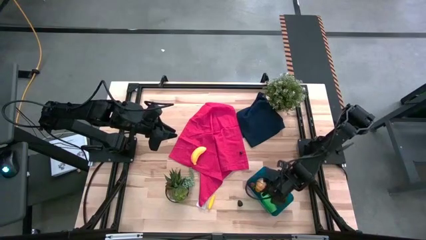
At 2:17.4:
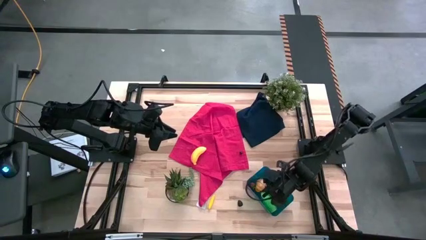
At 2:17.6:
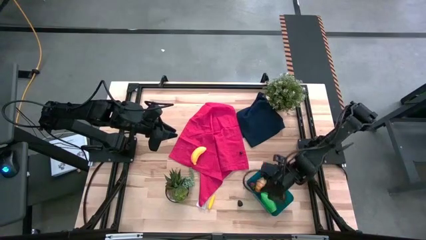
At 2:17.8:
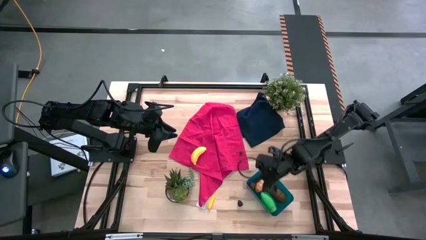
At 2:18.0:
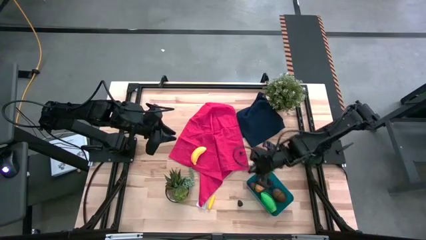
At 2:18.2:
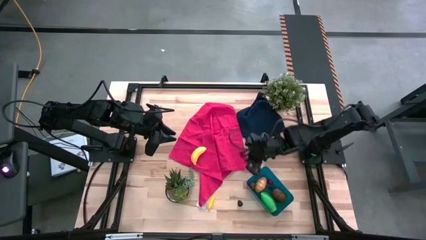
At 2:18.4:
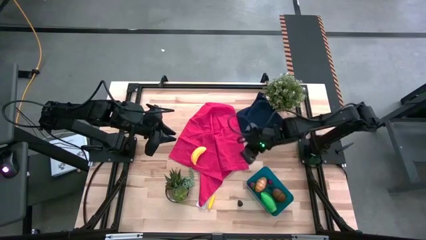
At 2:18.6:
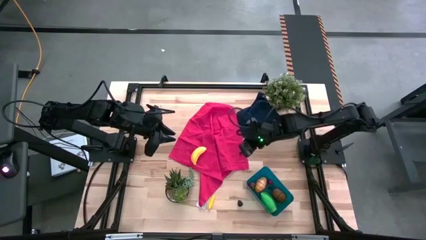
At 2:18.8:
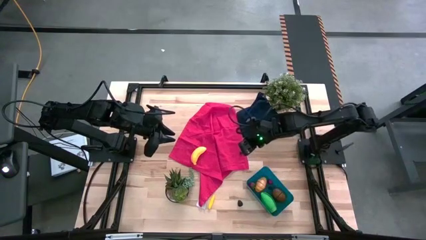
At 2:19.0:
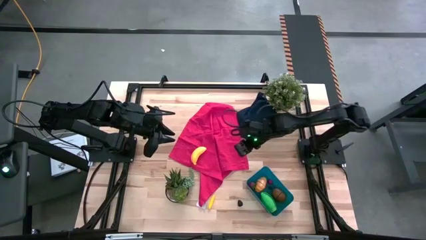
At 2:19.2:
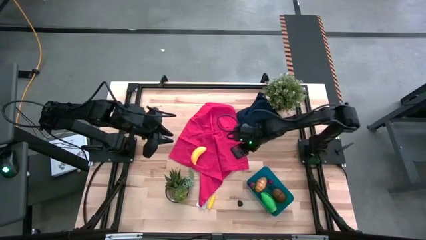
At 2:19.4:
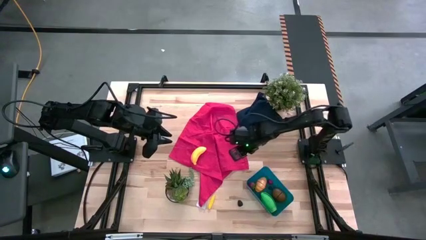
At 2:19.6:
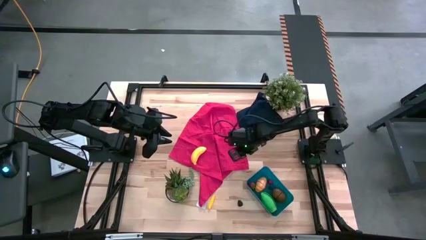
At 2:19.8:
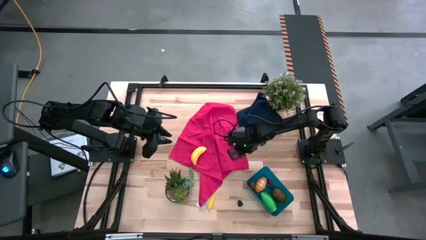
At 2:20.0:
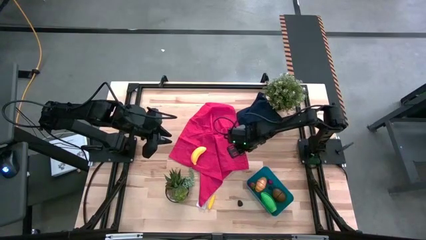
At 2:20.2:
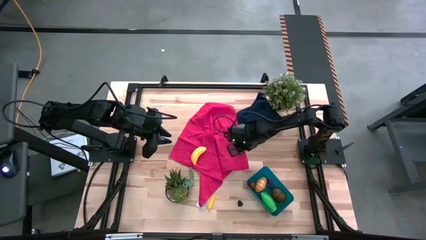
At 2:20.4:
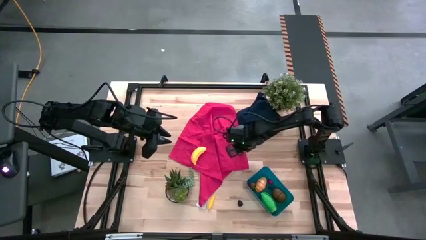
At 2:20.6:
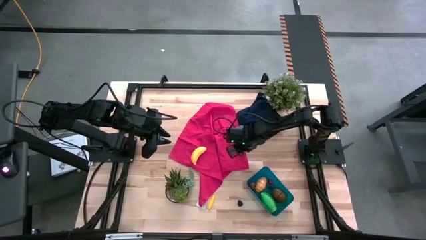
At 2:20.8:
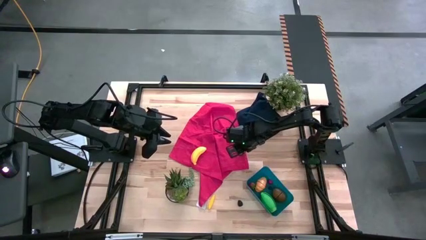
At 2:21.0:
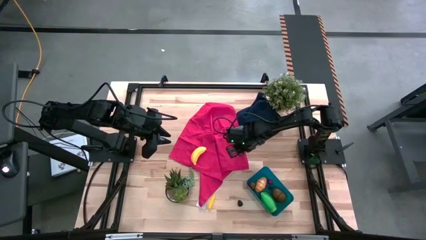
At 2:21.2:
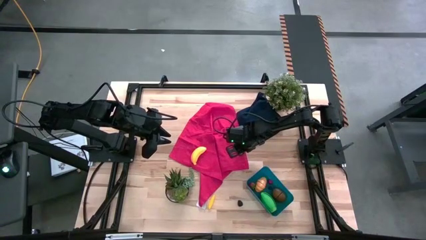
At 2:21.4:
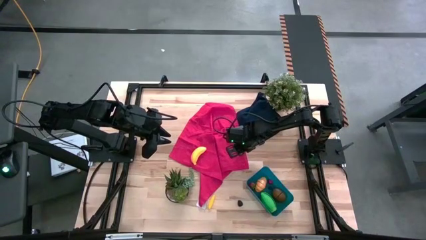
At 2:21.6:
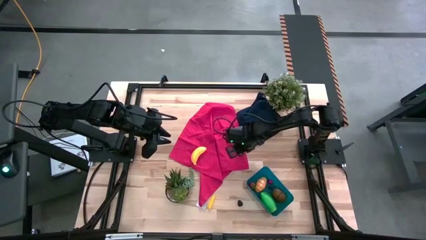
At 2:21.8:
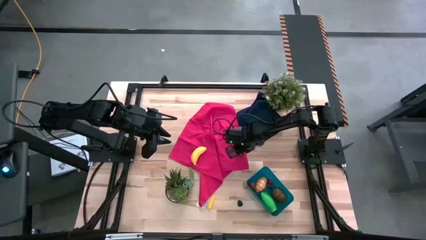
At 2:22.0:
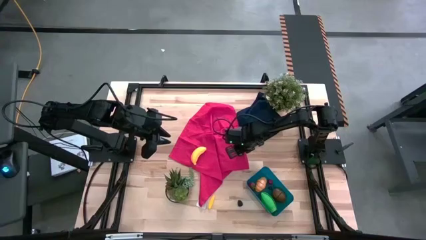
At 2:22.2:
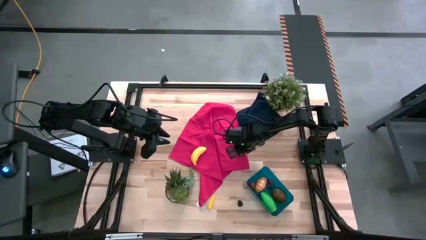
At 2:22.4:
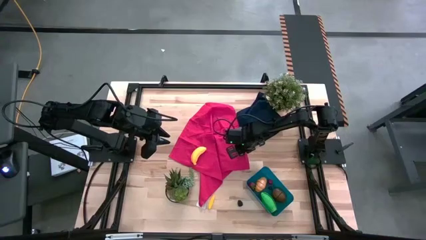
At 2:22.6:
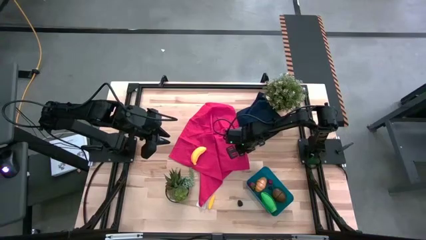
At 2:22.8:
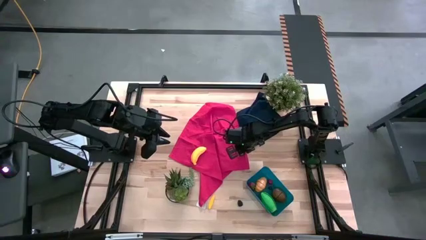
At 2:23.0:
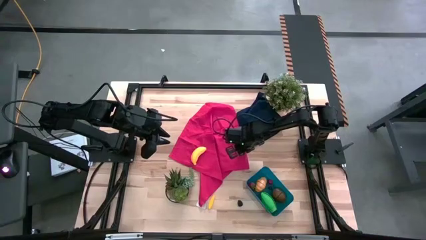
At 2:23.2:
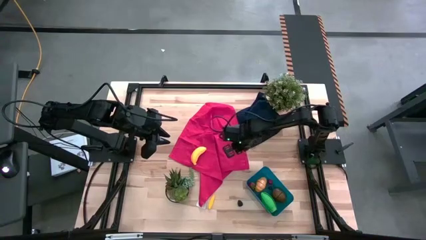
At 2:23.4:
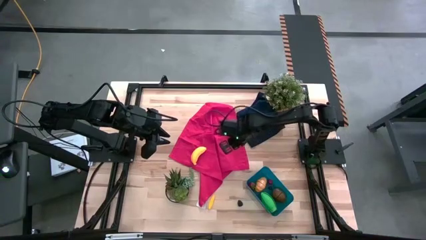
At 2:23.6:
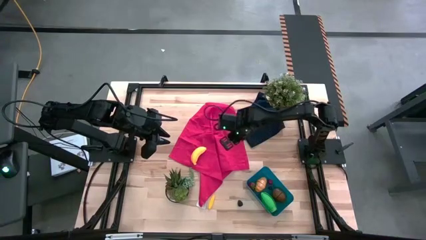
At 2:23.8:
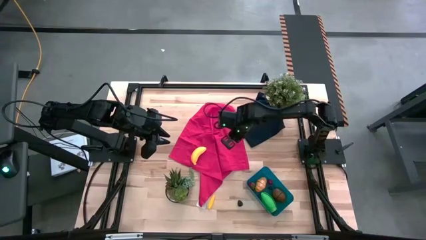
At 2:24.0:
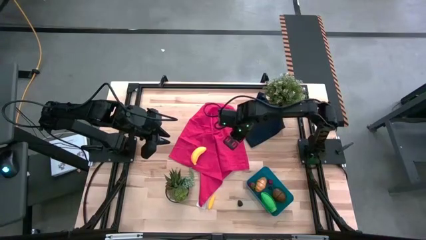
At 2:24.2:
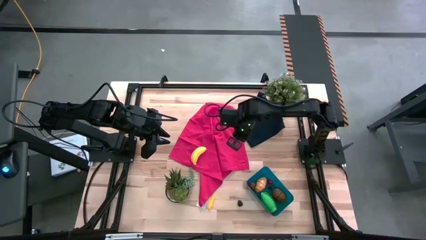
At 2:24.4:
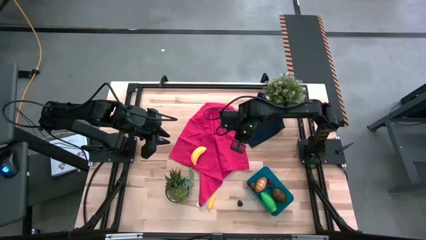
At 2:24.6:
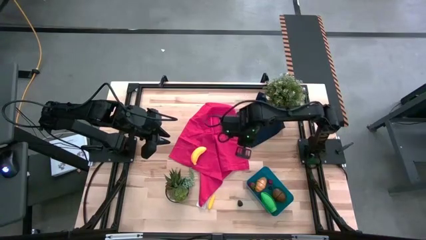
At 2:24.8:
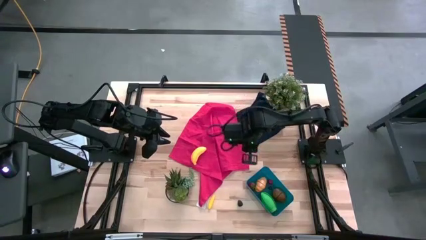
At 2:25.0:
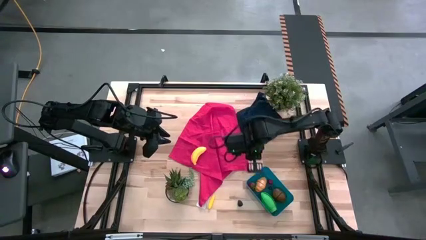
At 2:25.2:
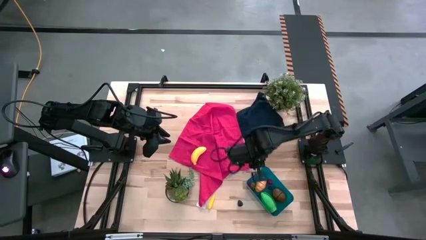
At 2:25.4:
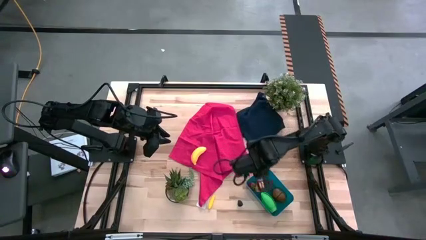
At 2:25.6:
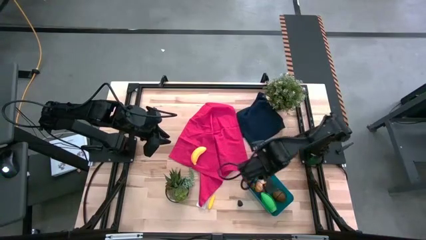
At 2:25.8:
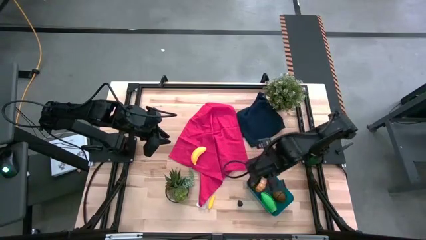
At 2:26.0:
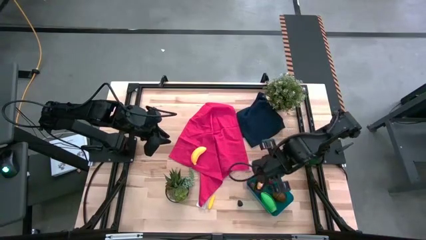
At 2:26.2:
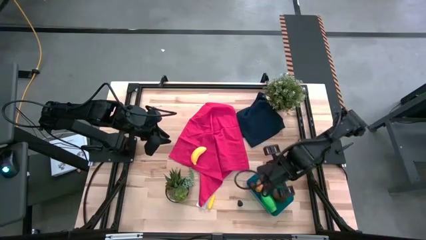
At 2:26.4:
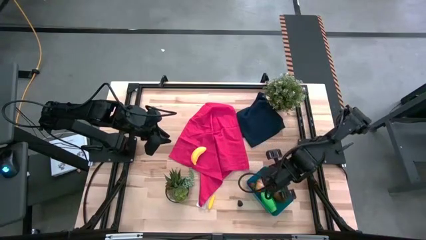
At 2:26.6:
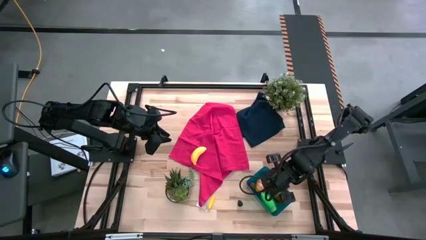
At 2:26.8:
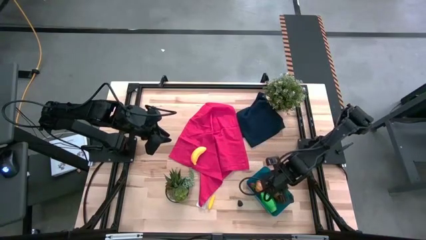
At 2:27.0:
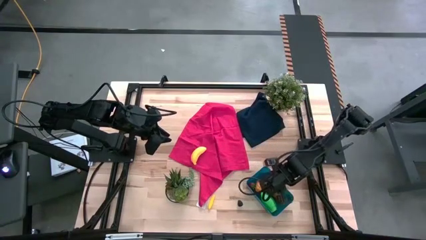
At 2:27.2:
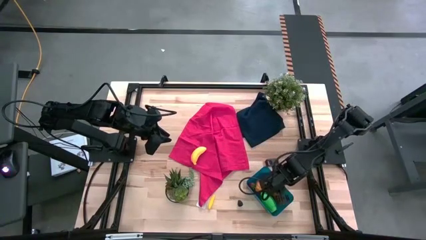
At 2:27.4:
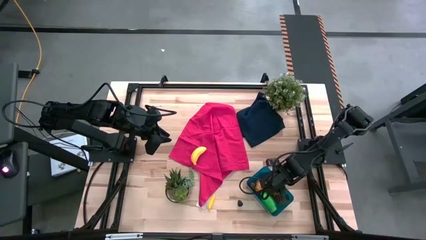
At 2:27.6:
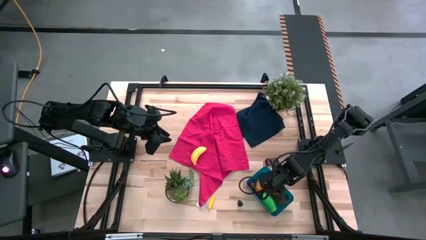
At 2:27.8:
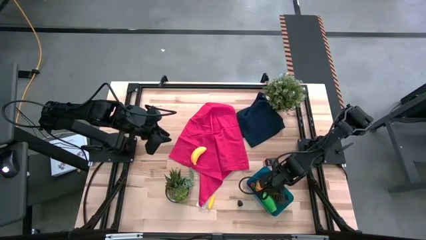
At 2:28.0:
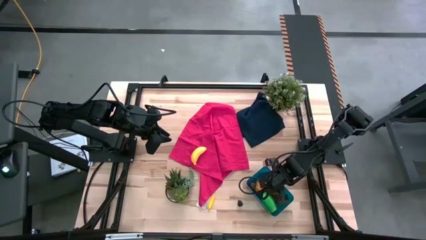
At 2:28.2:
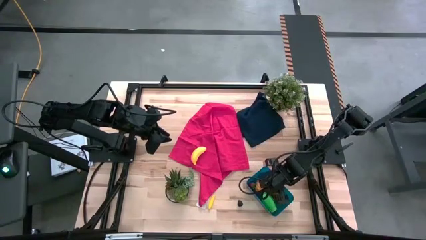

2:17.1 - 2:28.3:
Task: Pick and placing Produce into tupperware
Put the blueberry into the blue bin
